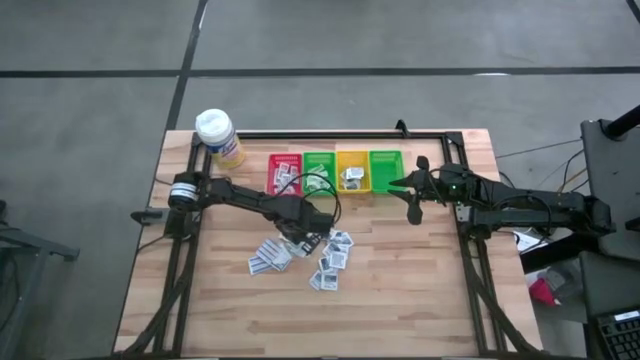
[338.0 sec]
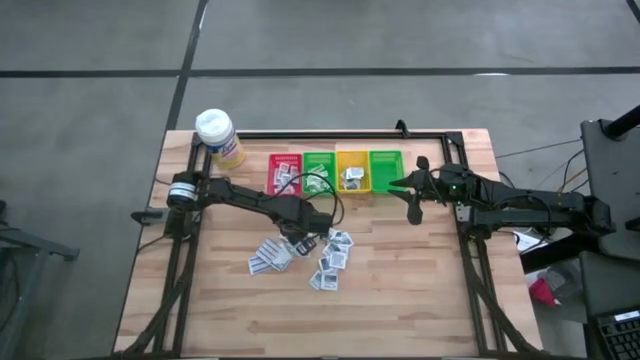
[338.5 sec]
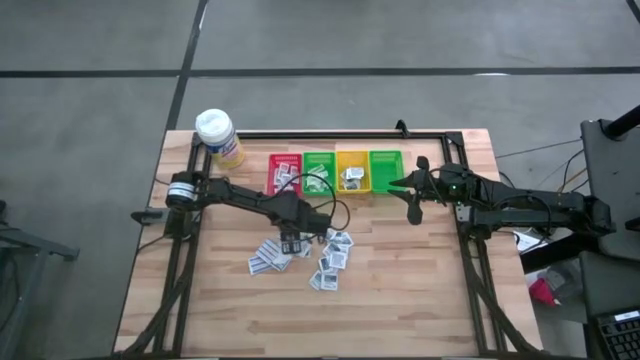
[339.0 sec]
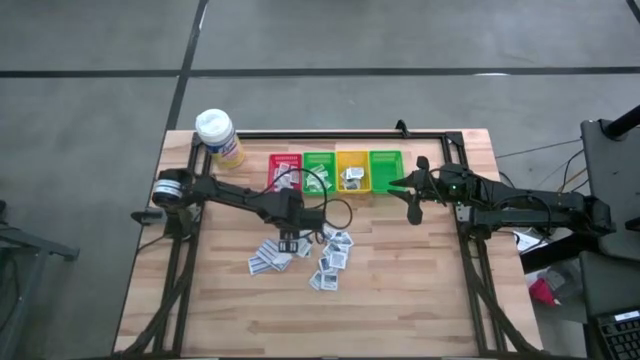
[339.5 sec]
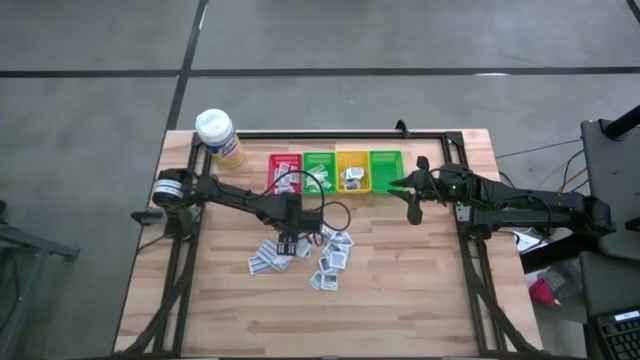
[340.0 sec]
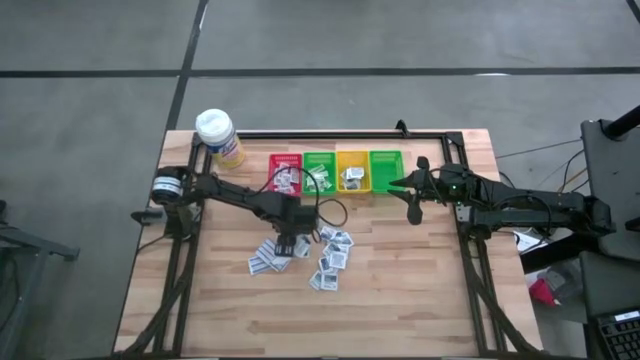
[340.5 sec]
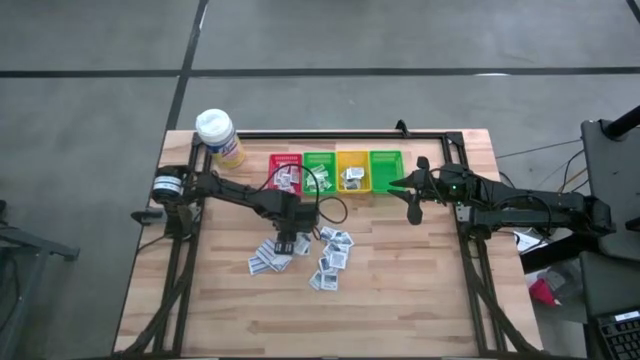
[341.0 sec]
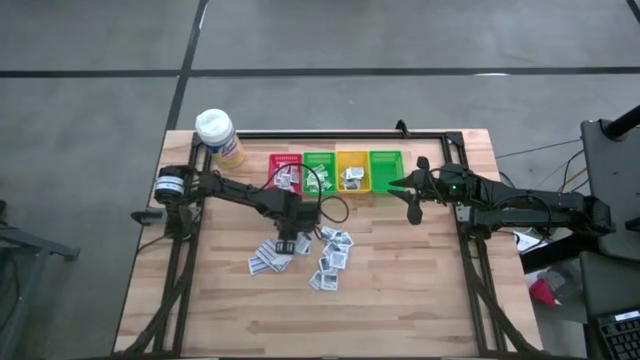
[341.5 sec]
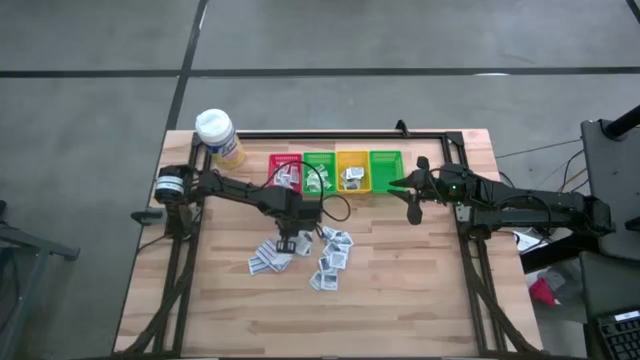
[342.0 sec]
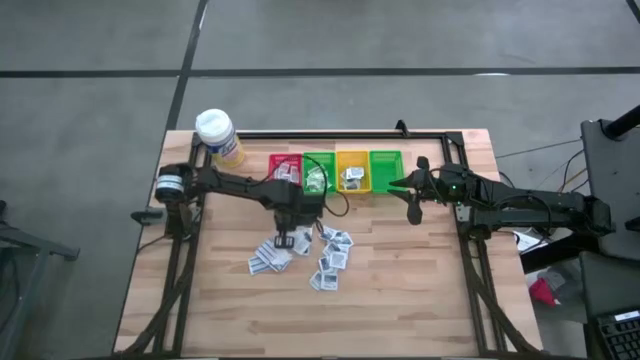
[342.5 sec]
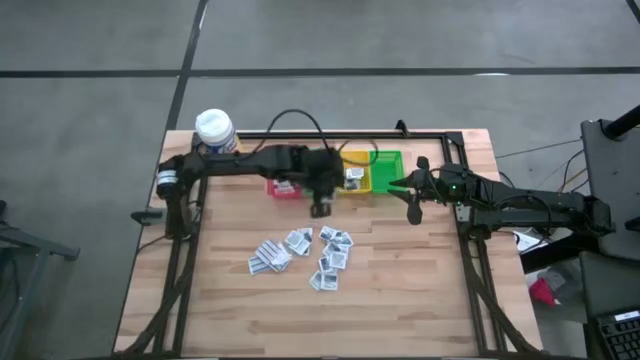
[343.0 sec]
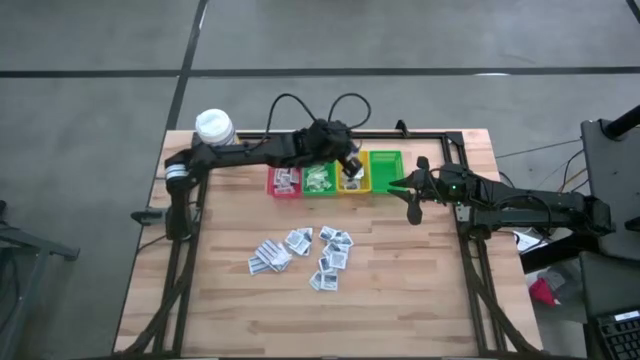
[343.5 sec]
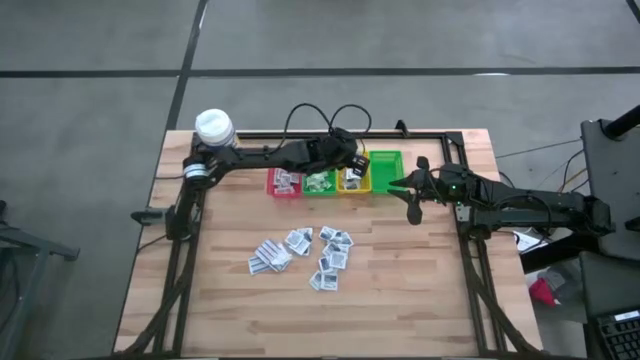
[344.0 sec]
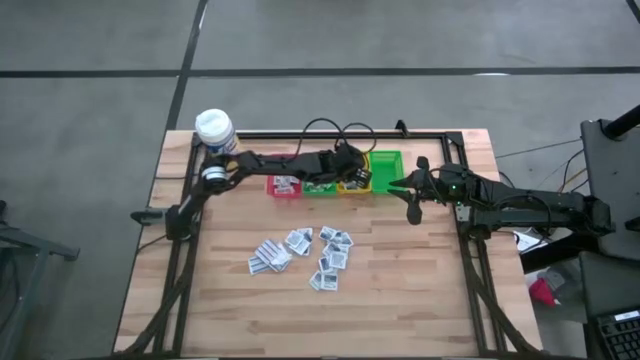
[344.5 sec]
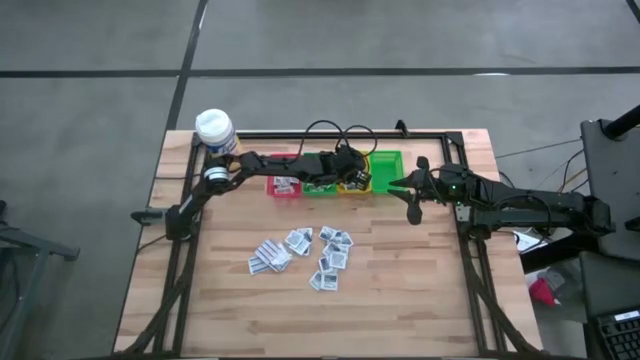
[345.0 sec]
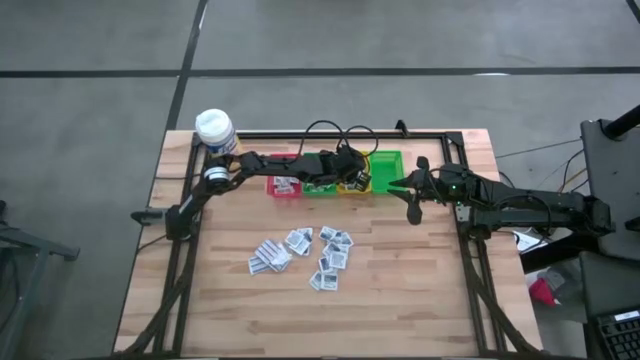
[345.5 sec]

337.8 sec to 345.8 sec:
Task: Pick & Place First Aid Supplies
Put the alcohol pad into the yellow bin

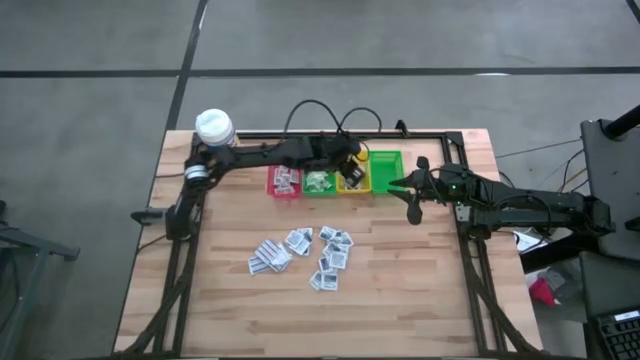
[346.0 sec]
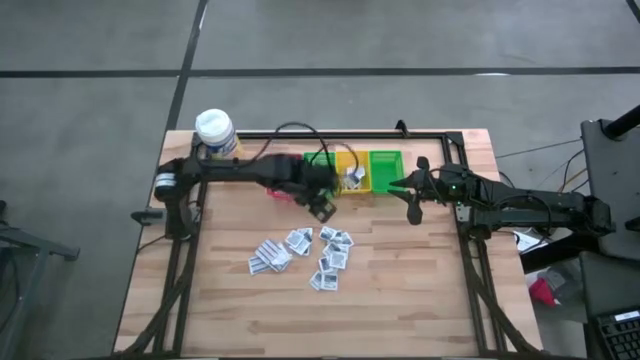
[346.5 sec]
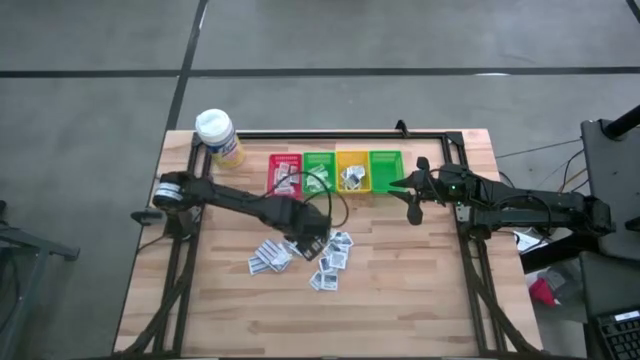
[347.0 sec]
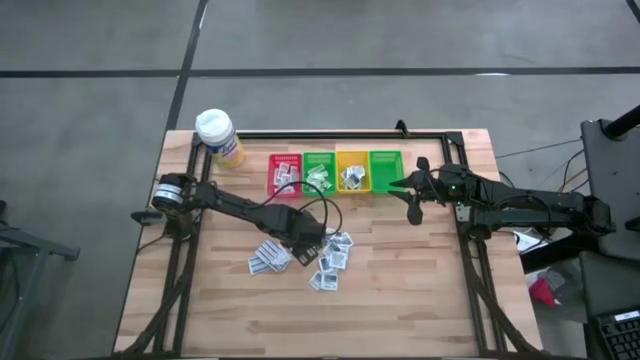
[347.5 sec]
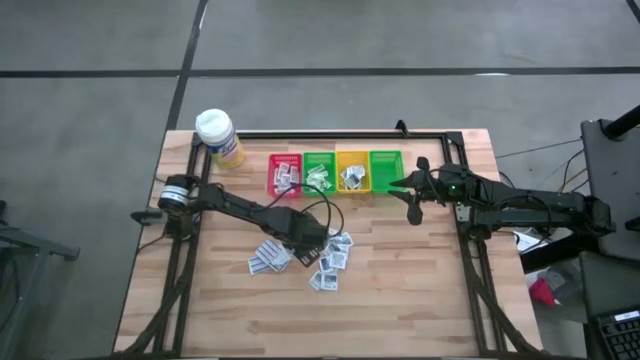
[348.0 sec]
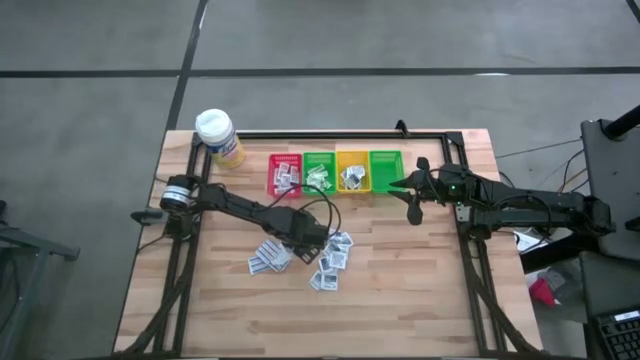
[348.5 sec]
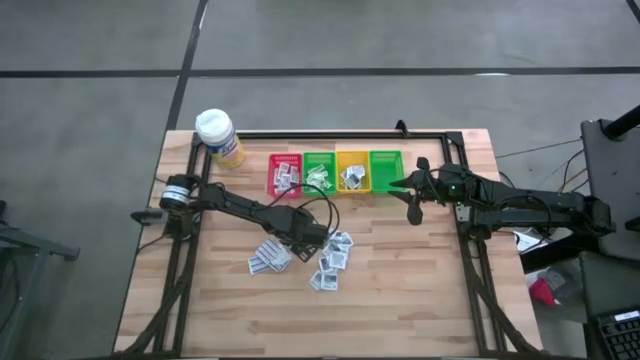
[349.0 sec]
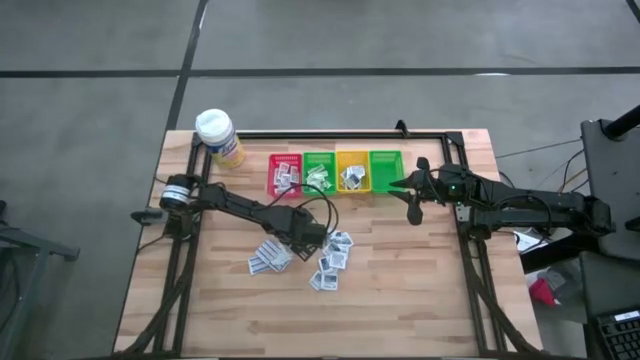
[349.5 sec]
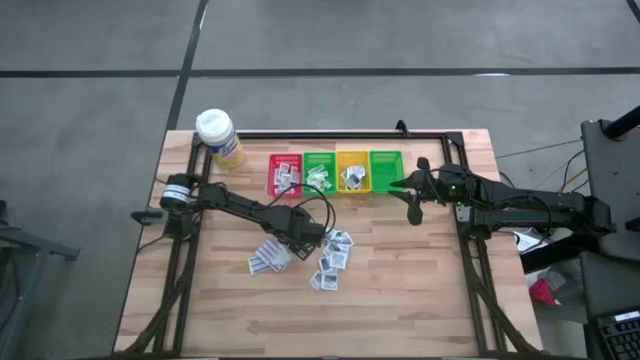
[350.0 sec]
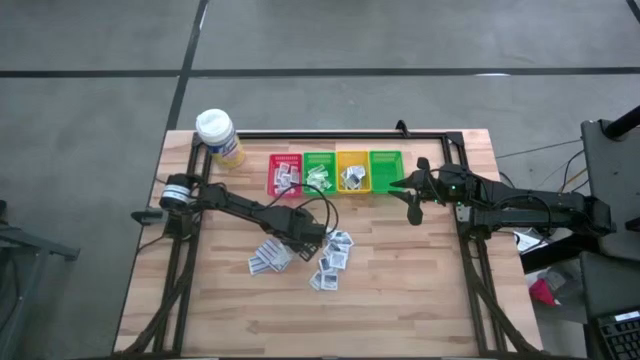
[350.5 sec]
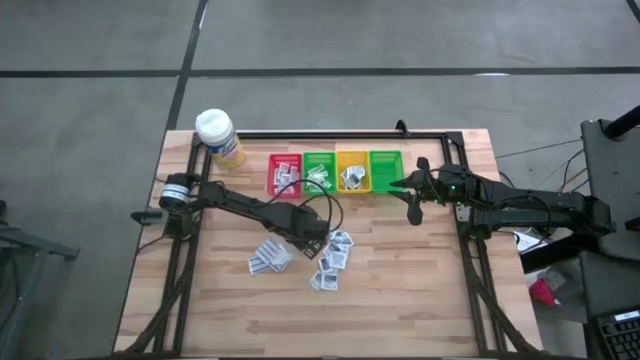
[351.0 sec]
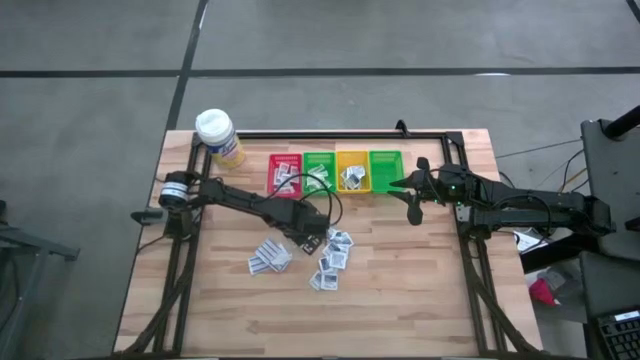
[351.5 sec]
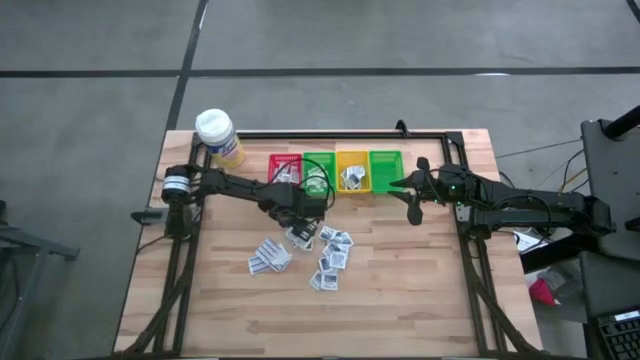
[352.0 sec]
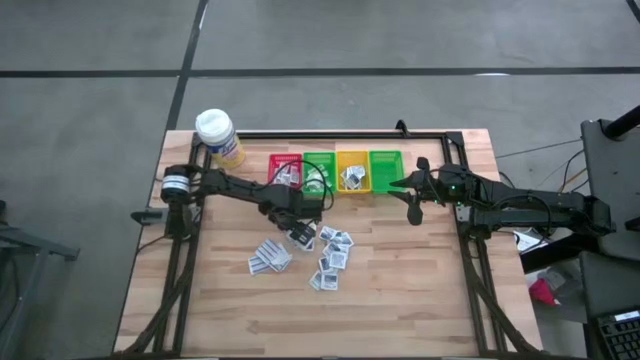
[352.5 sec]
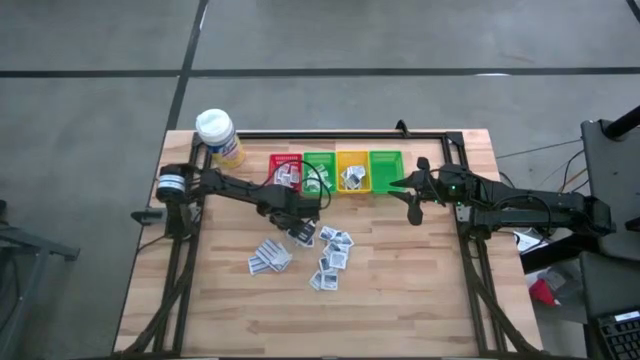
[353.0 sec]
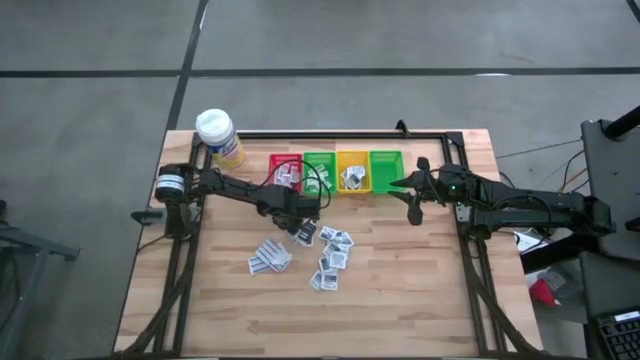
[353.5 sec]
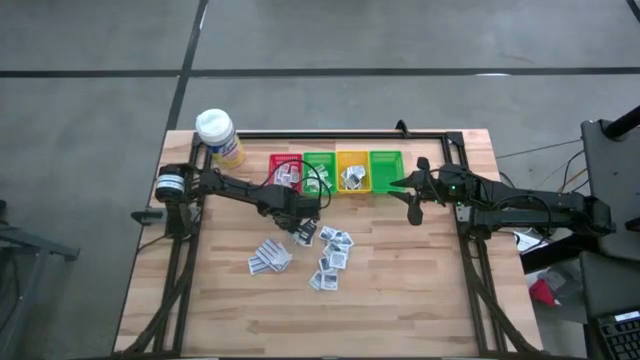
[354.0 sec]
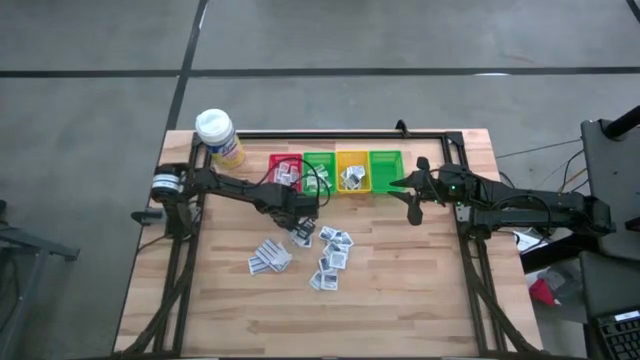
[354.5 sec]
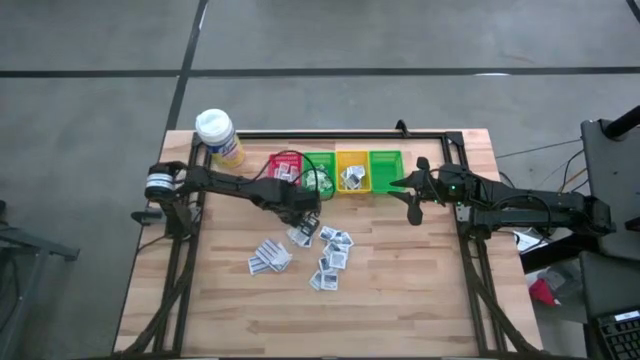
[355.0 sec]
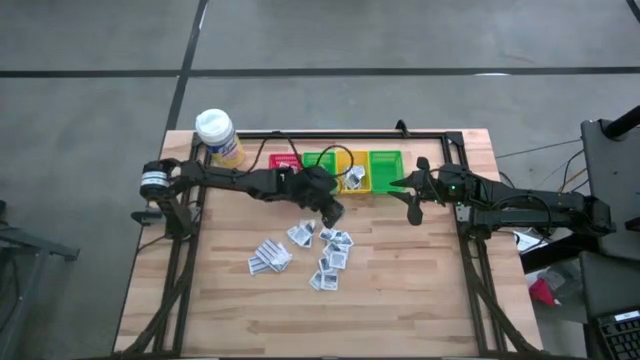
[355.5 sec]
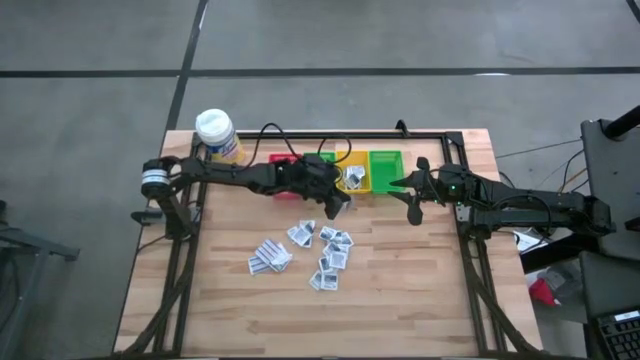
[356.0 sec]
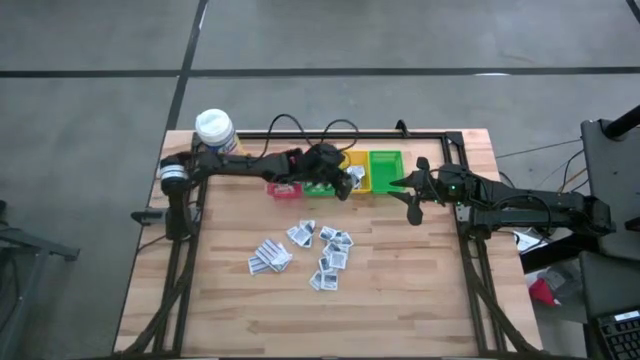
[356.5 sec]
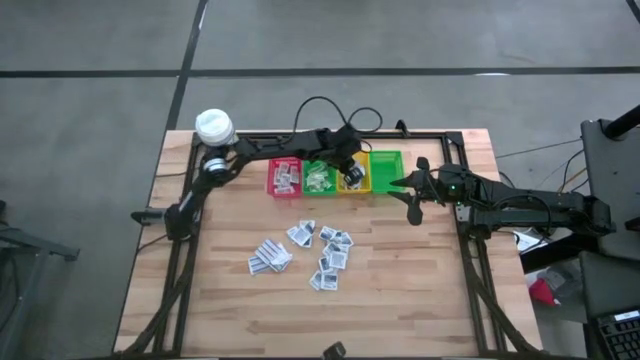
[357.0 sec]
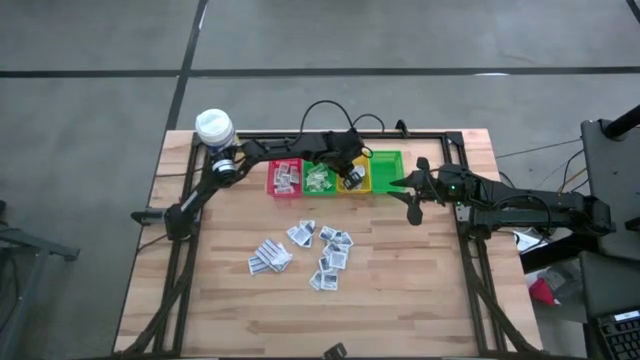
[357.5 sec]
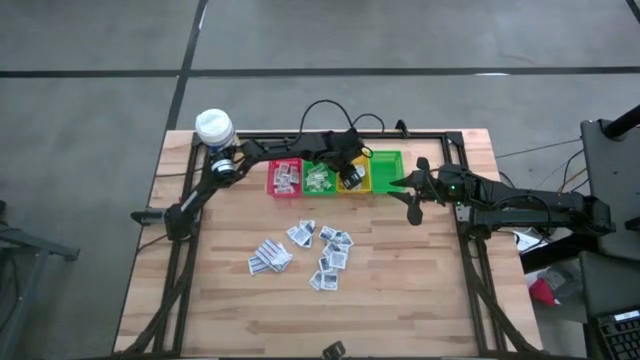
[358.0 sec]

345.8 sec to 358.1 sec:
Put the alcohol pad into the yellow bin
